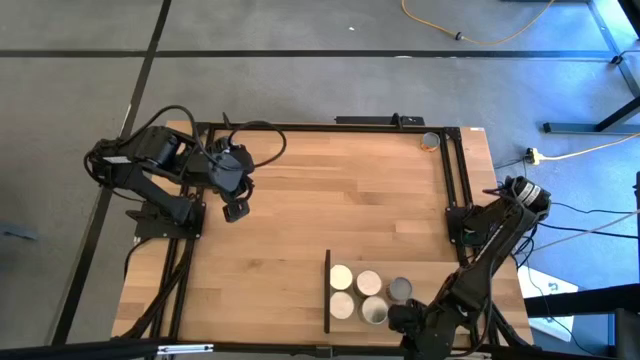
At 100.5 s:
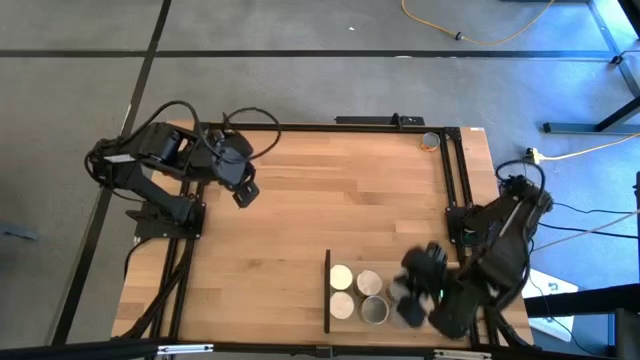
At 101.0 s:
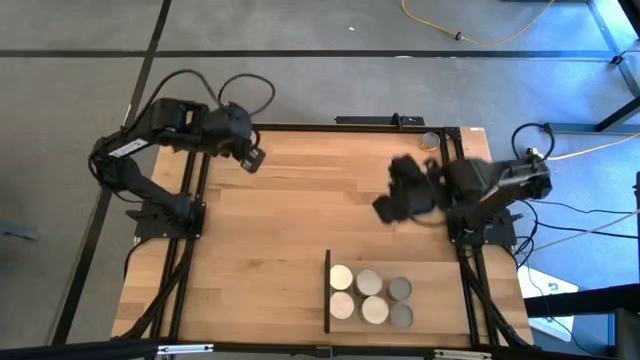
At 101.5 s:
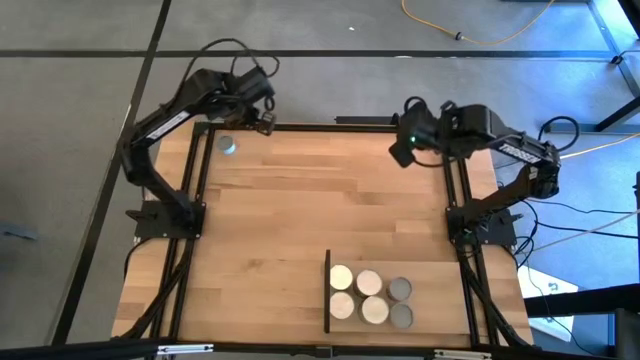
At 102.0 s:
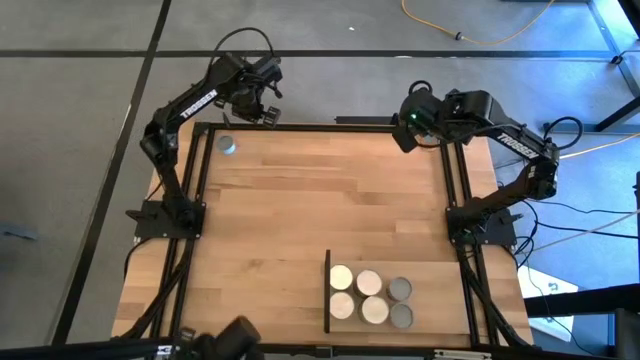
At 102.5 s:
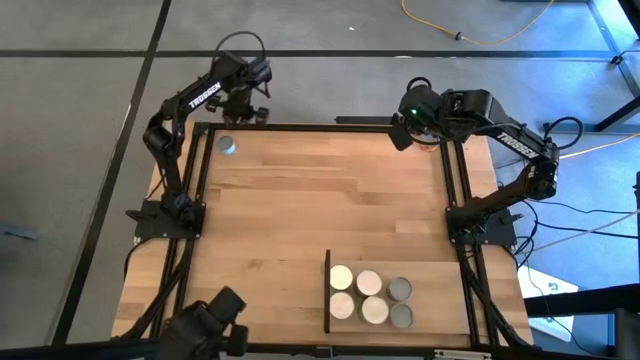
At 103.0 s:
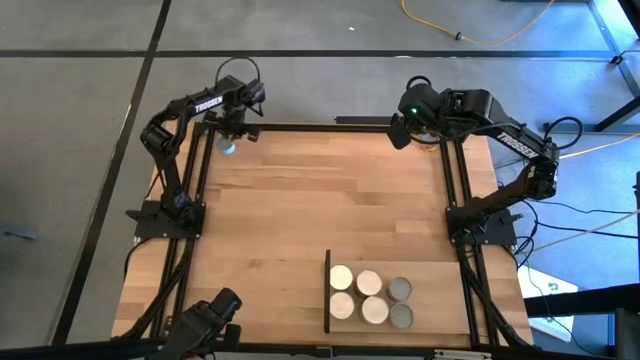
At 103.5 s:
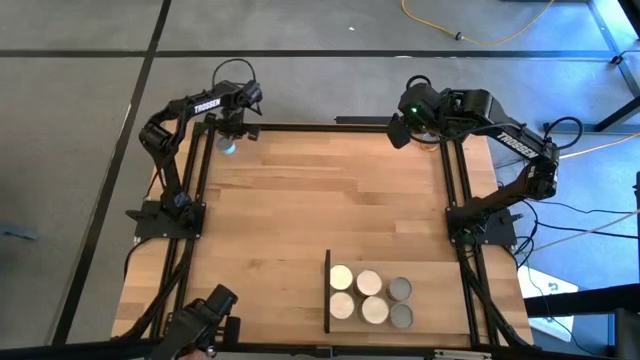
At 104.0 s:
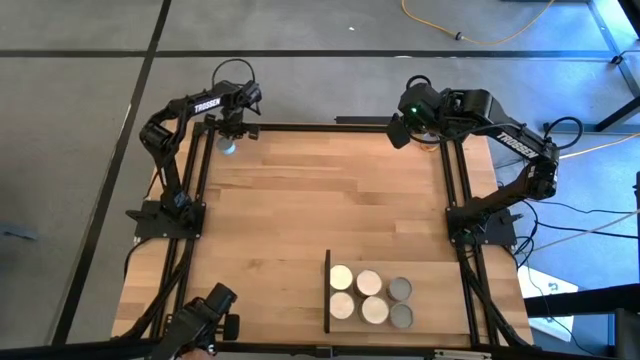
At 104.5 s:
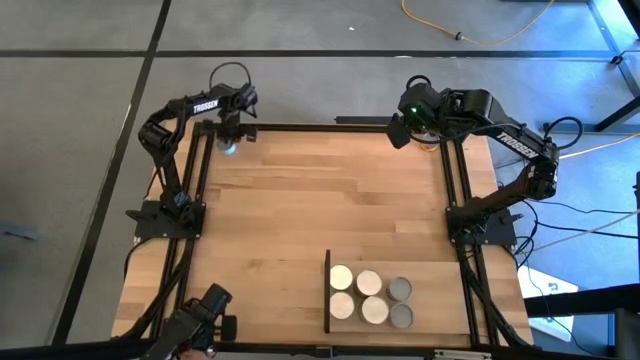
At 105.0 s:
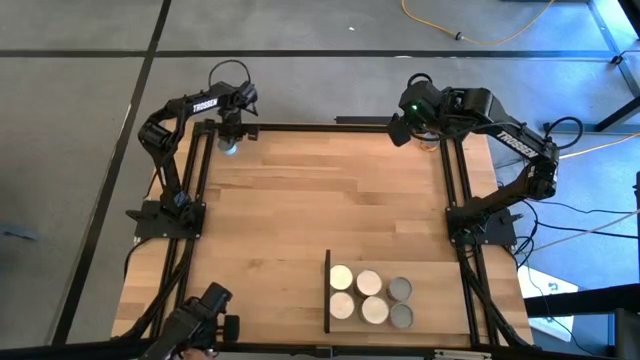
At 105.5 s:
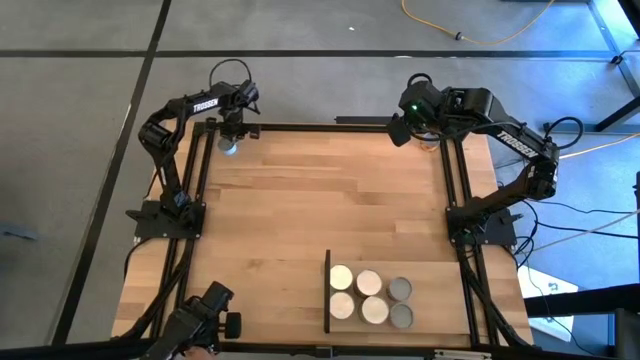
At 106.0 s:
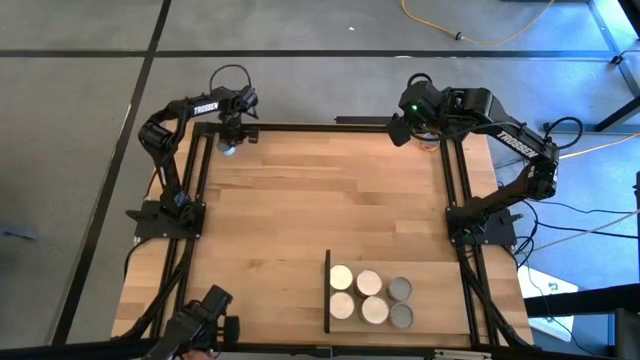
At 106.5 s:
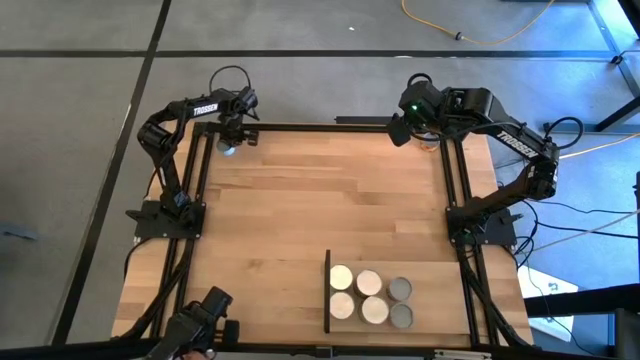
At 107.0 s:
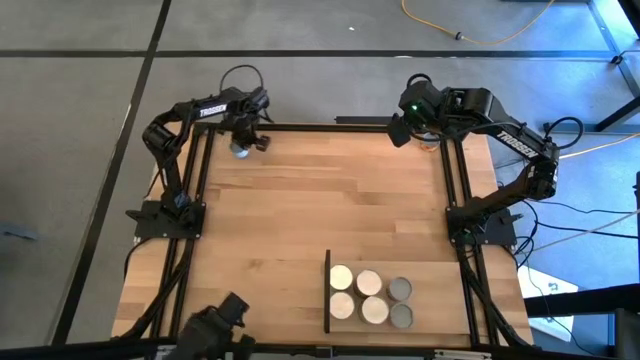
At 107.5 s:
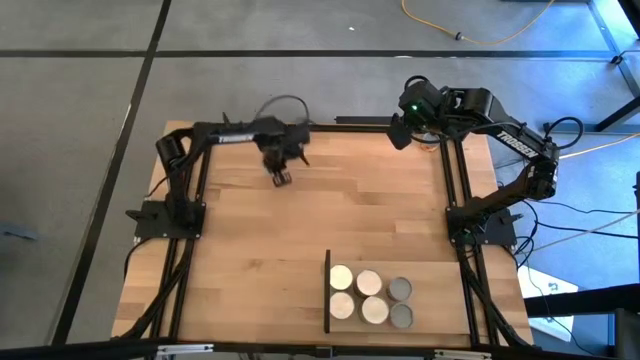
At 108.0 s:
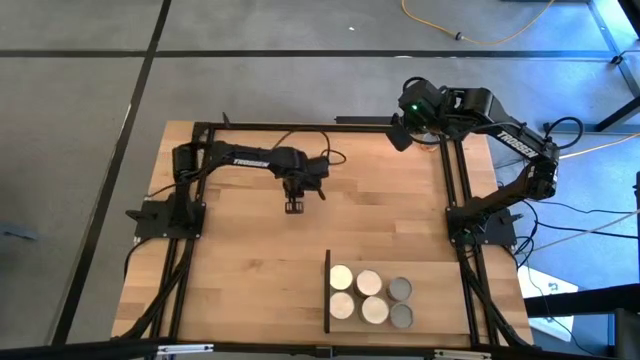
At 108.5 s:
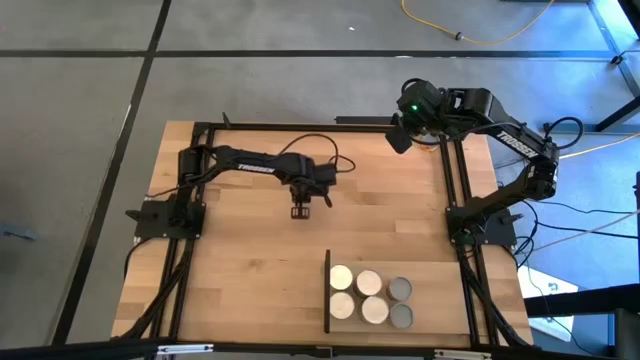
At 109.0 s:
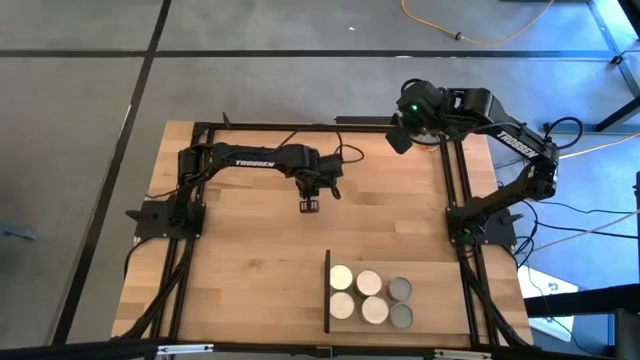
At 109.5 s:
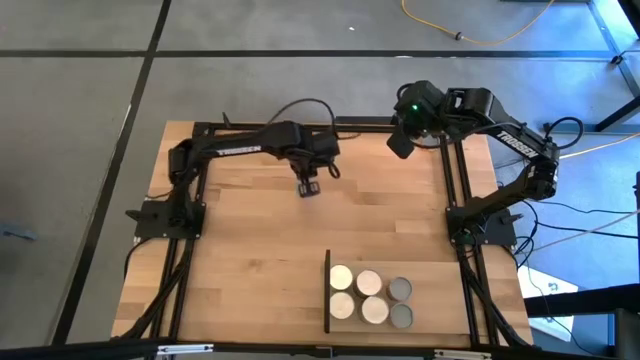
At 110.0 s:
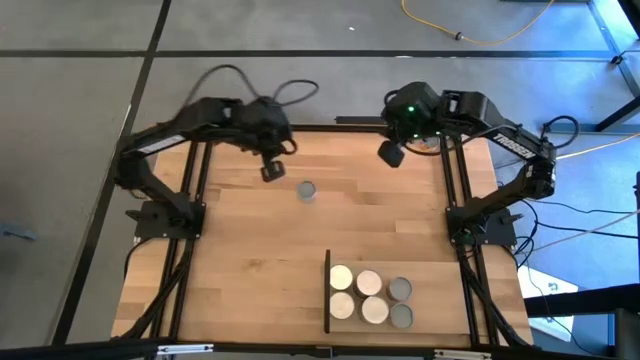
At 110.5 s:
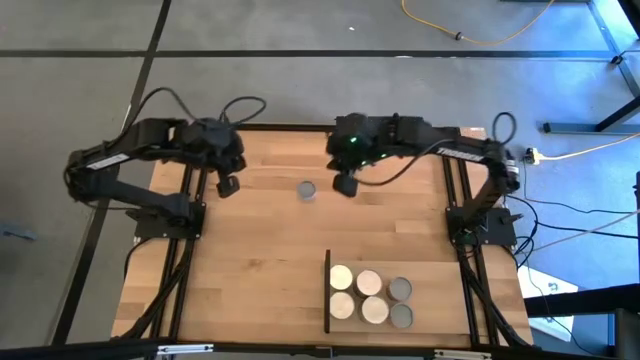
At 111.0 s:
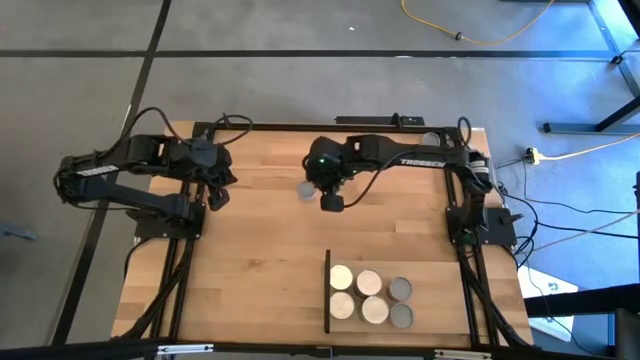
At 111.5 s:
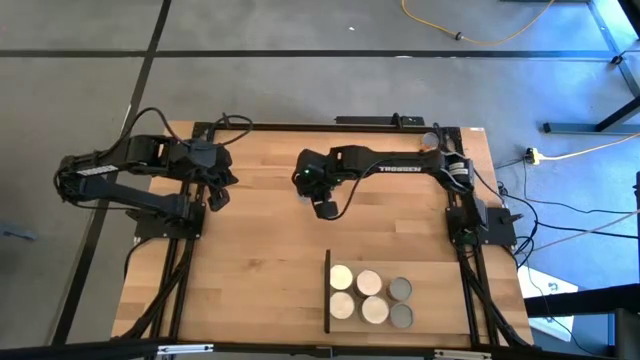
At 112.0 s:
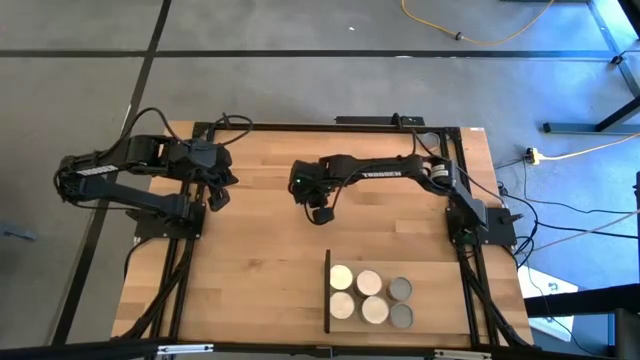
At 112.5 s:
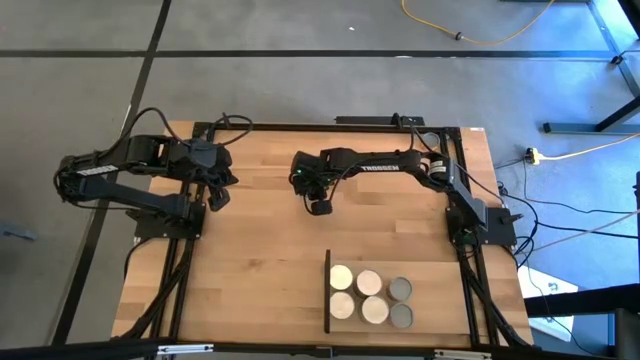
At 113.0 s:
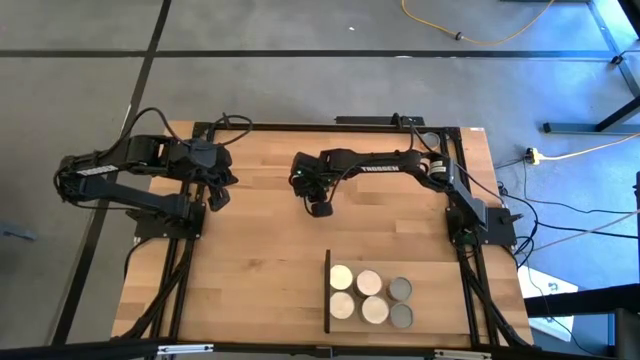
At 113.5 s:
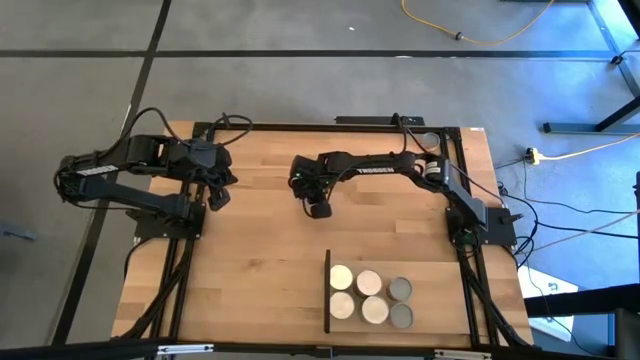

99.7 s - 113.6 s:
Task: Pick and place cans onto a shelf
Put the blue tuna can on the shelf

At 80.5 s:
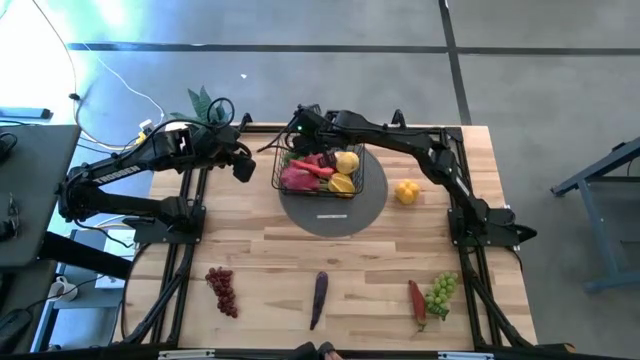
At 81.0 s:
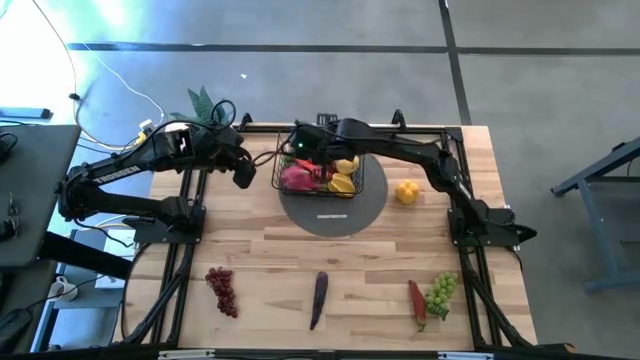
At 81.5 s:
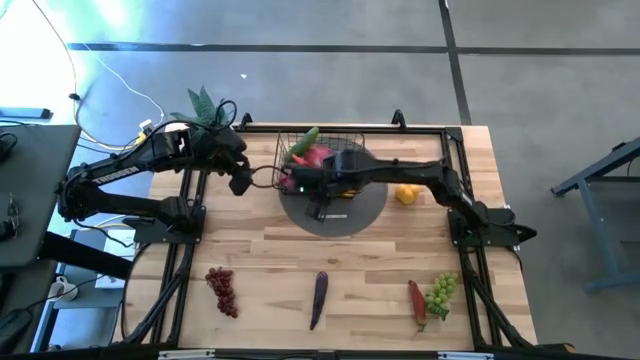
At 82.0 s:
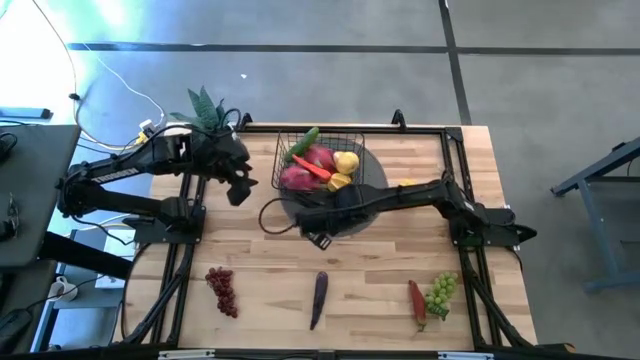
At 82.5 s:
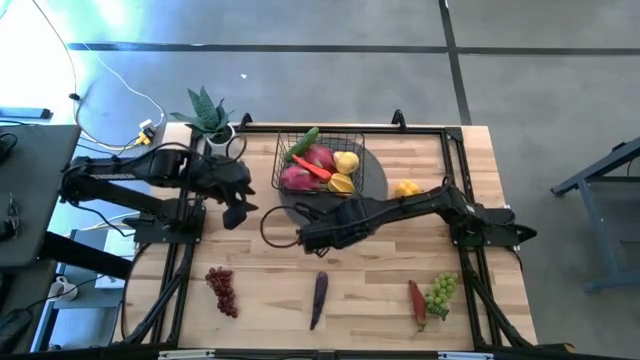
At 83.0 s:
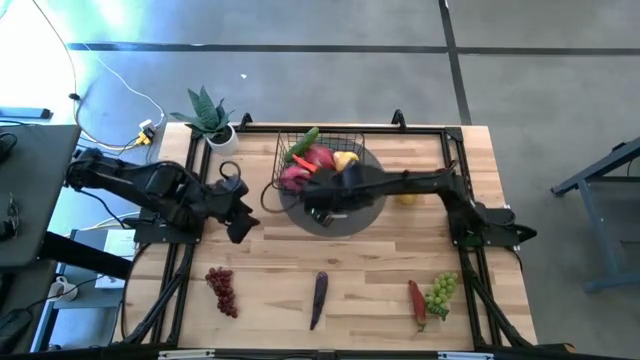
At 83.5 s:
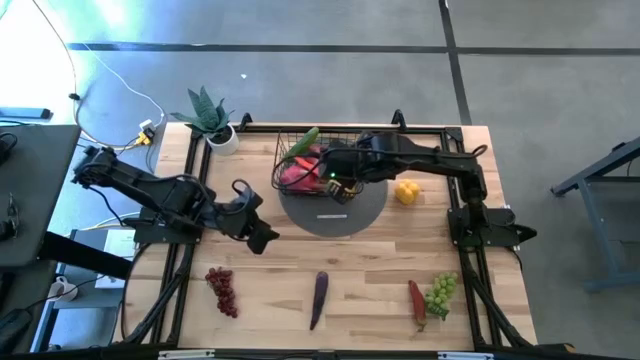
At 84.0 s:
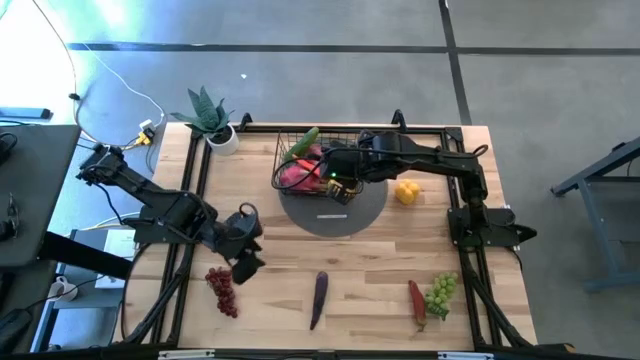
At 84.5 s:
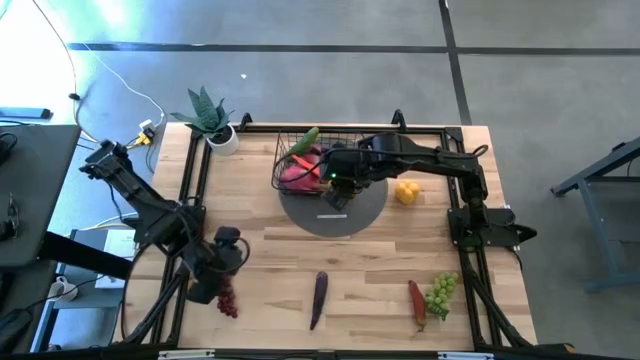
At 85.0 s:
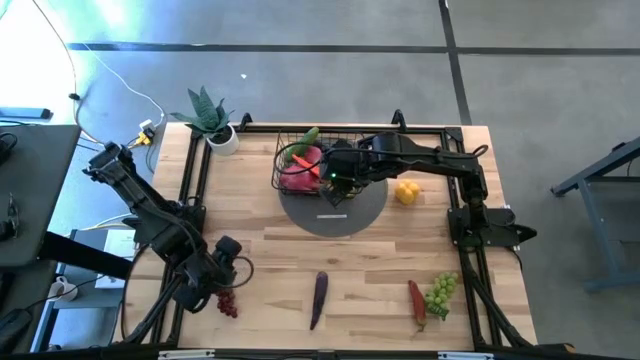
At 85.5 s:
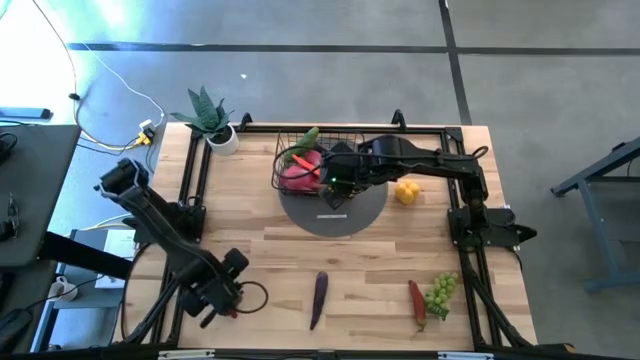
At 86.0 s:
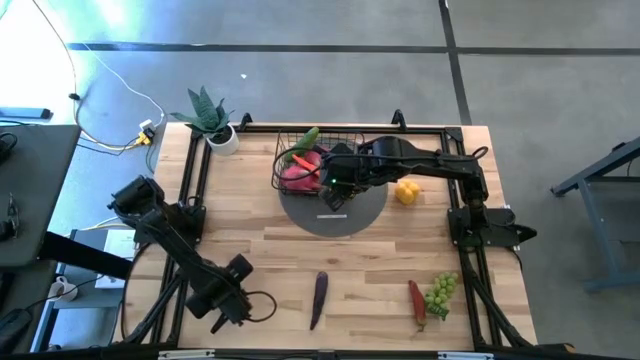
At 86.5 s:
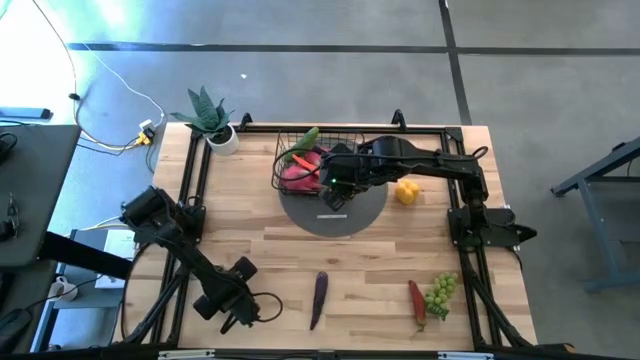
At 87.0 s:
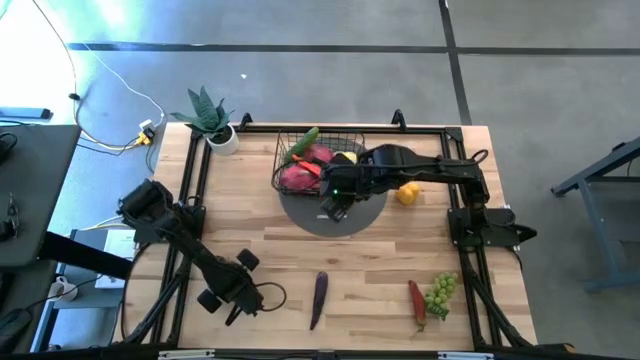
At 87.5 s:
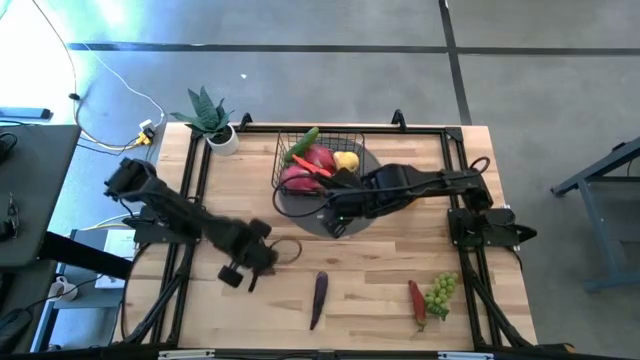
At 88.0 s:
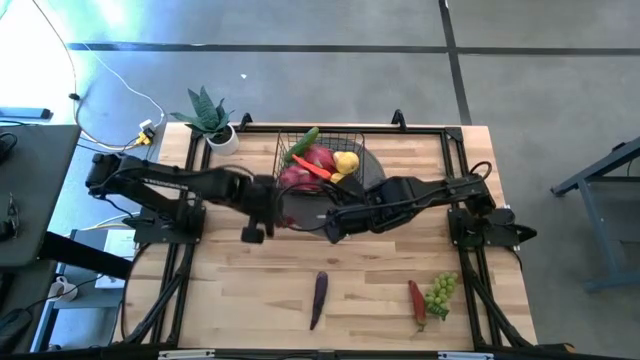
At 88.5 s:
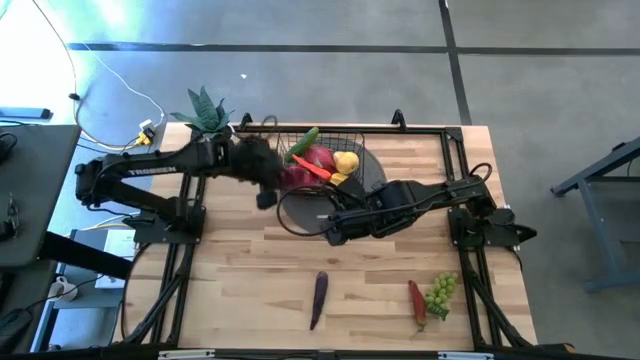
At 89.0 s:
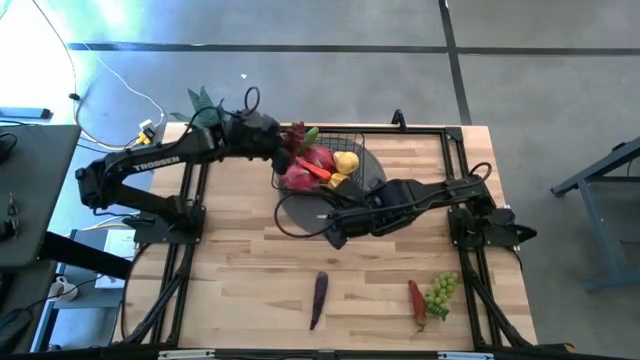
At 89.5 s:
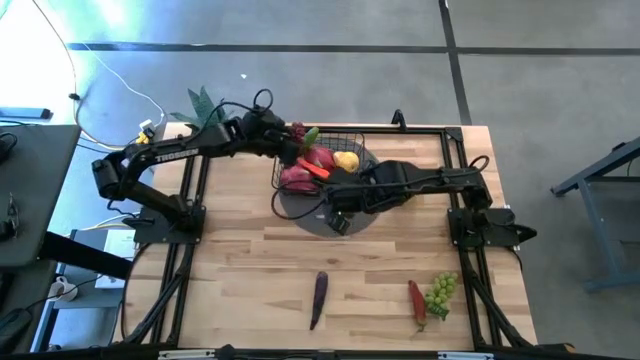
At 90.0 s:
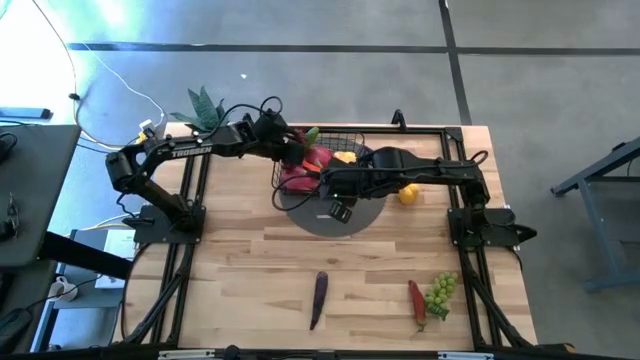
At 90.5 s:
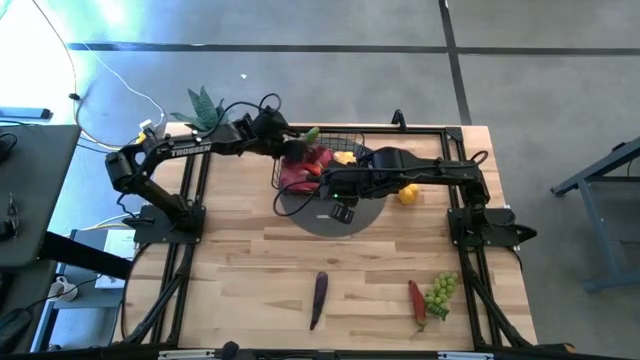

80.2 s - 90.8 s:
Task: Build produce basket
Put the red grapes into the black wire basket
